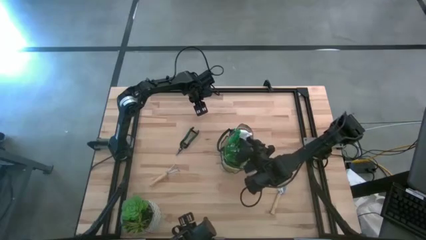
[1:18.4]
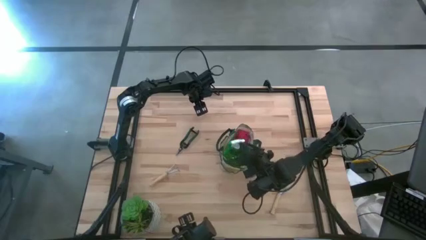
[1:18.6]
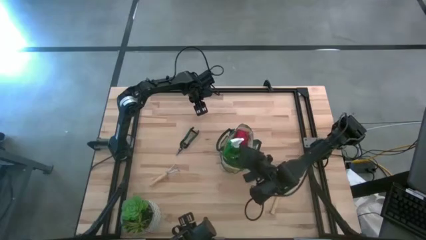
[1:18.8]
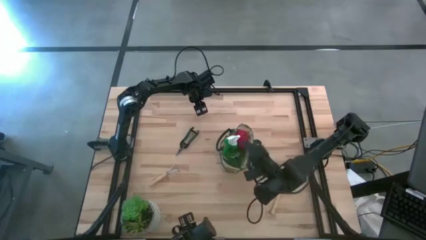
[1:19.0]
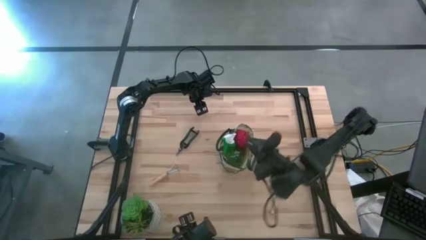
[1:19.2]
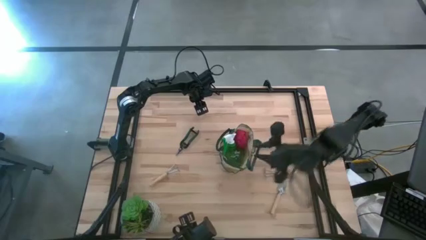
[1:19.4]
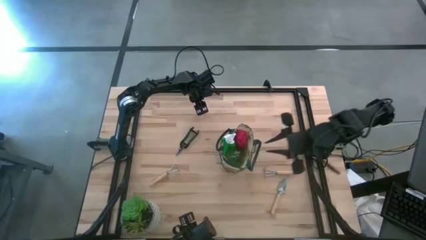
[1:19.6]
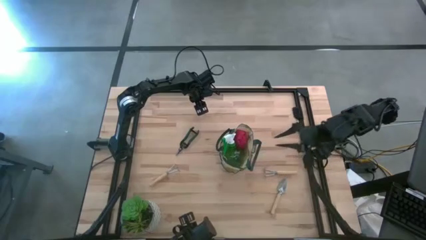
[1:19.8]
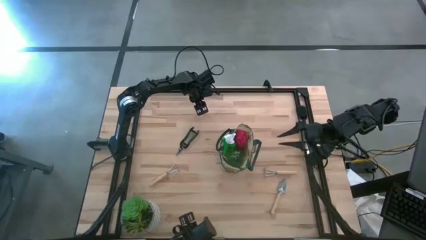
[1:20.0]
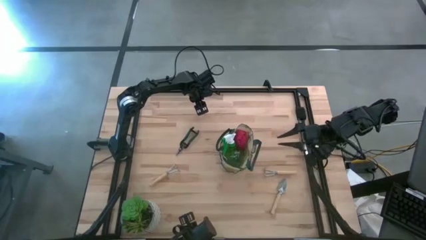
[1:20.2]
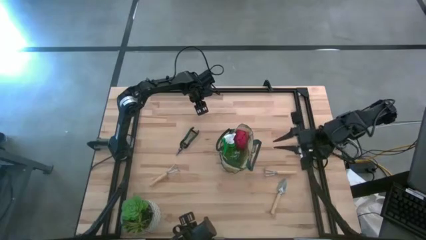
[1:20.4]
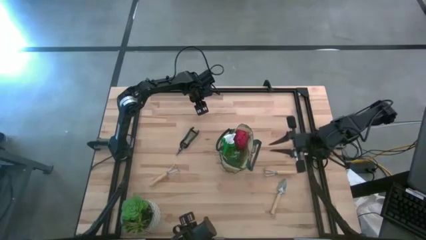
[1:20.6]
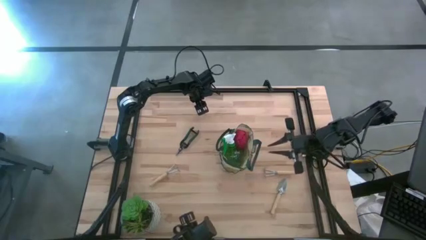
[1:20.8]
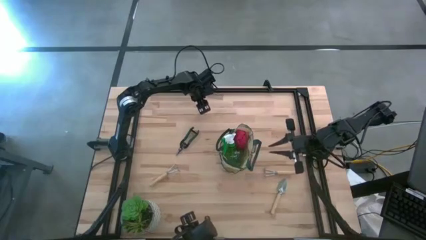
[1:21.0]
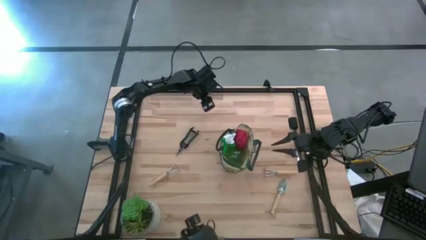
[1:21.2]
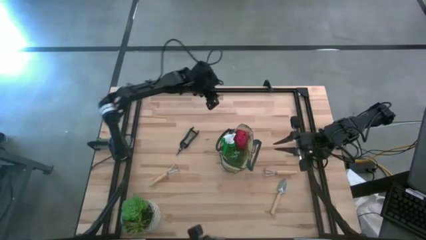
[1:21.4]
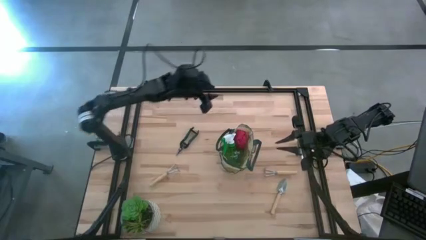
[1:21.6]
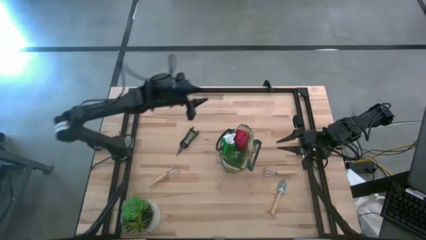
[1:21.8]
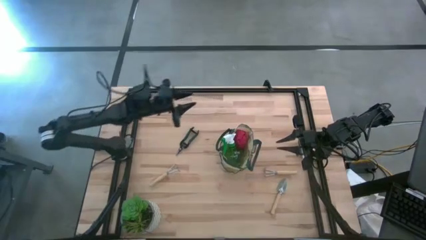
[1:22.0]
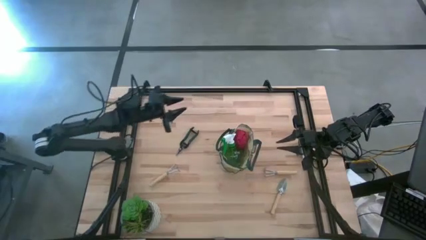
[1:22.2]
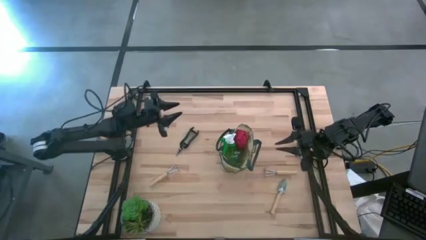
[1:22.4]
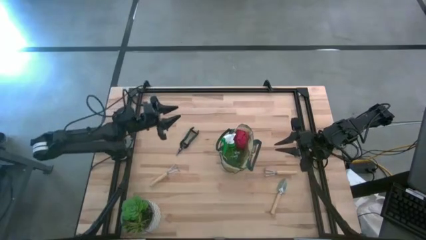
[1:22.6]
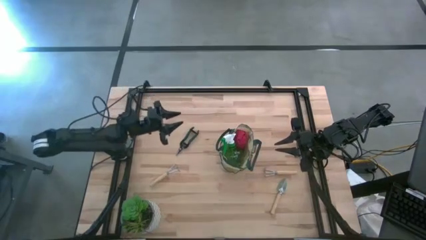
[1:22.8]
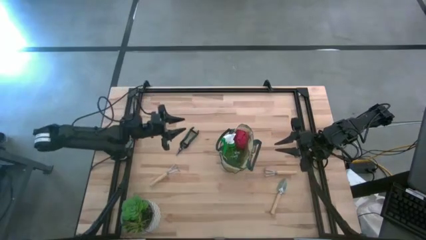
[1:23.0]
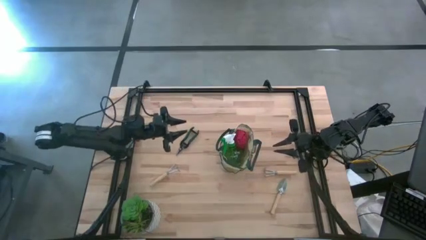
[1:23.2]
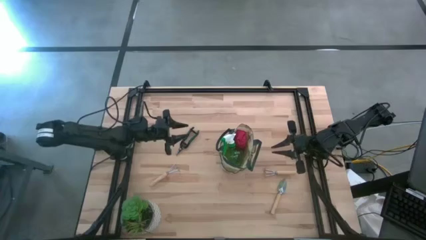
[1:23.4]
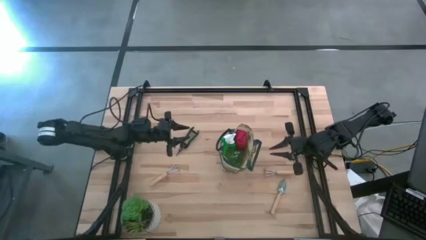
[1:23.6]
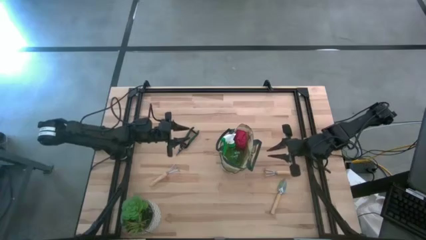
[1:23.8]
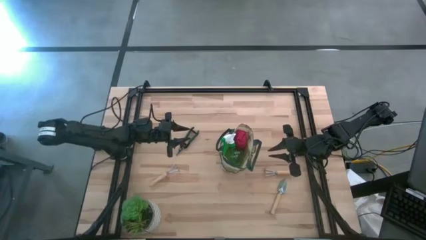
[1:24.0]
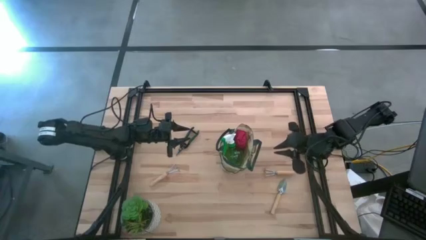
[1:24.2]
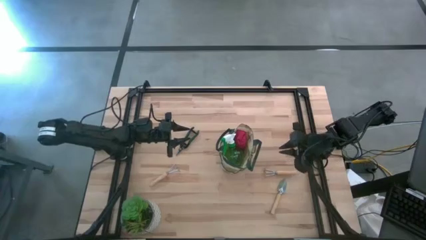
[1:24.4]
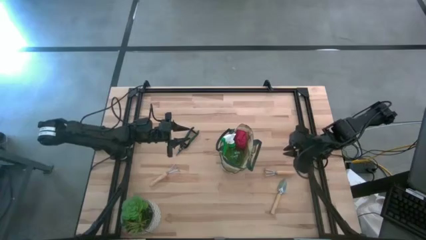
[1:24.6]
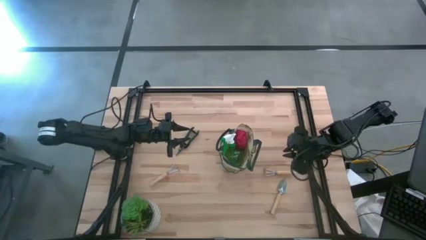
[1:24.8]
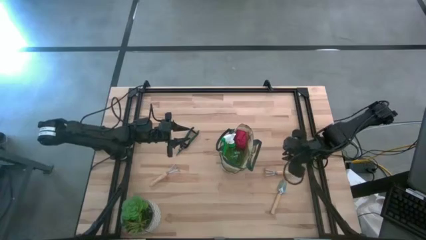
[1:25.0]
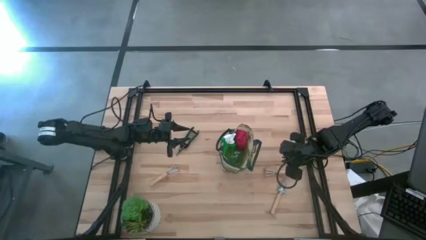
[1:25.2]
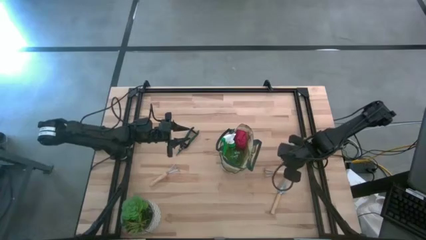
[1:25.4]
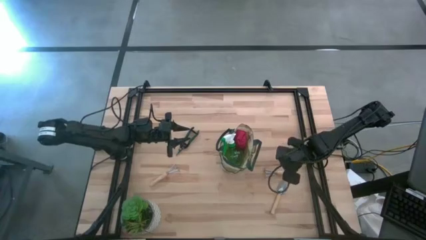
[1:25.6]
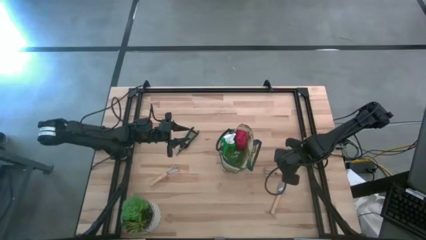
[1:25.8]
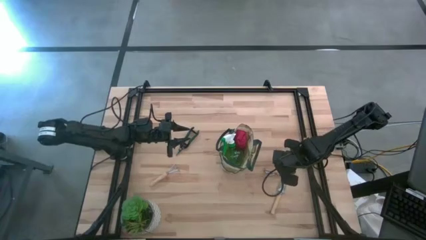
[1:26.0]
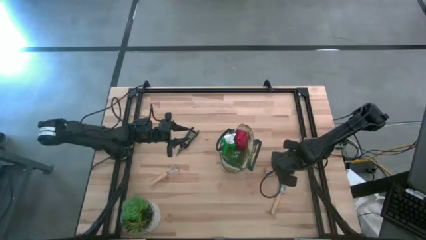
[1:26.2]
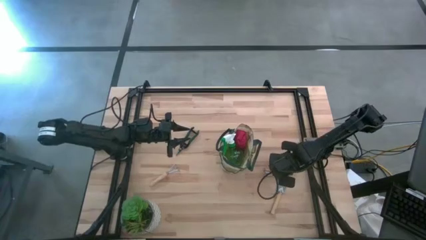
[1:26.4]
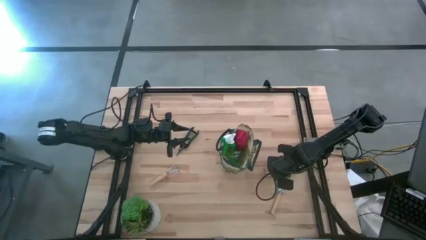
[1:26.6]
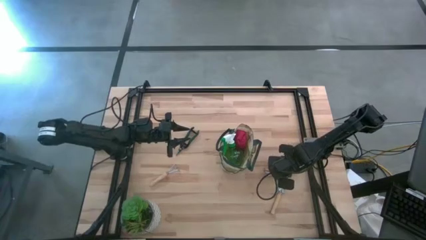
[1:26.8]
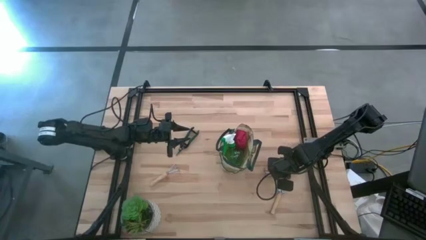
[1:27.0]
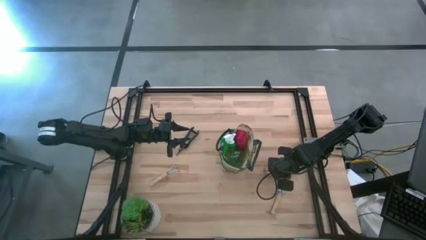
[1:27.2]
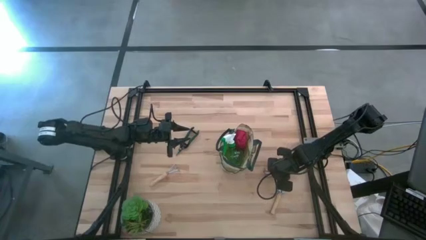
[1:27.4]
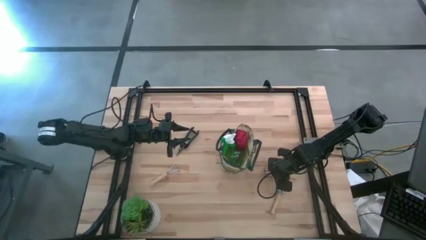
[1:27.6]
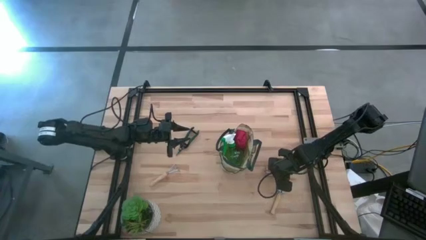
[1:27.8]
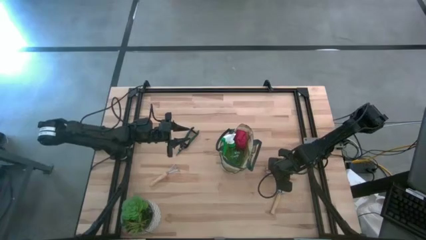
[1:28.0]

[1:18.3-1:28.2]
Task: Pick & Place Garden tools in Gardening bag
Put the right hand rake into the pocket of the gardening bag
